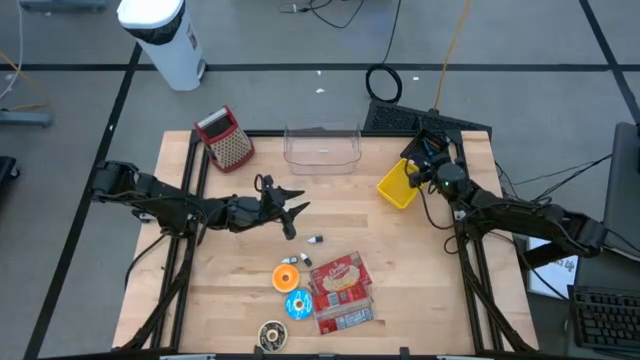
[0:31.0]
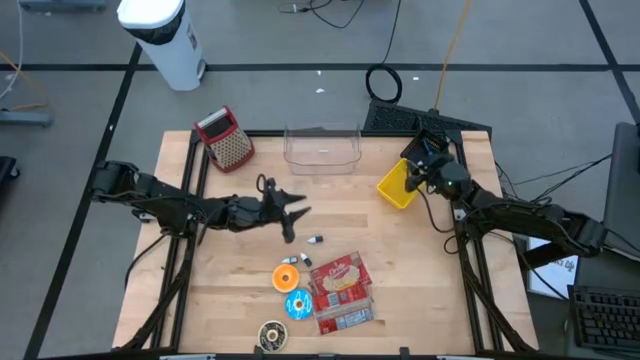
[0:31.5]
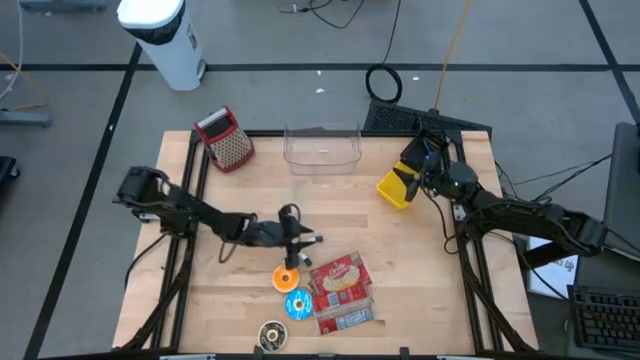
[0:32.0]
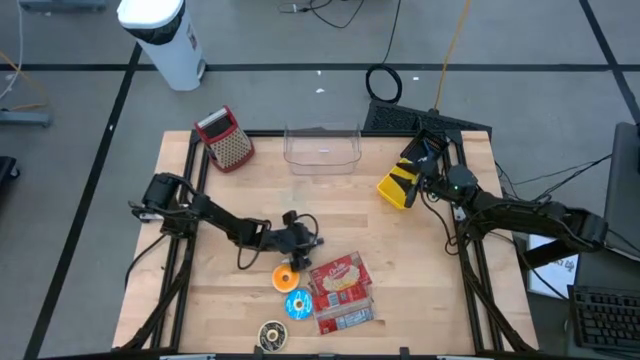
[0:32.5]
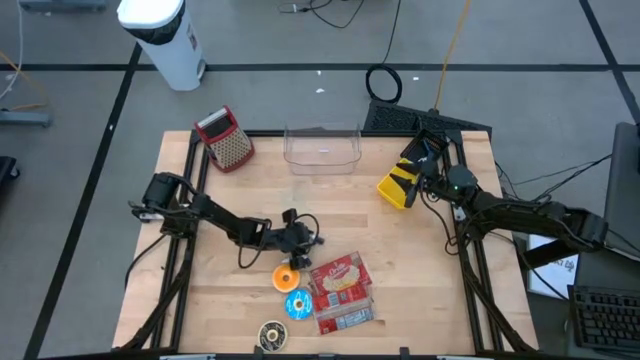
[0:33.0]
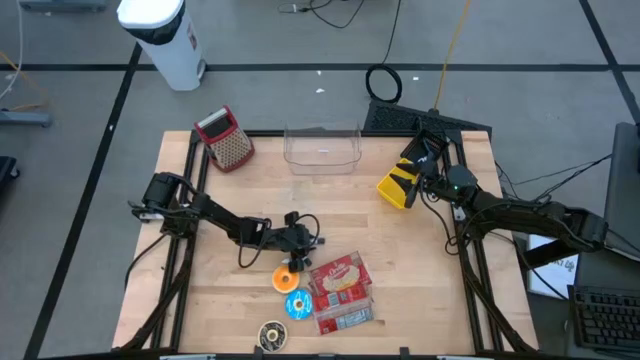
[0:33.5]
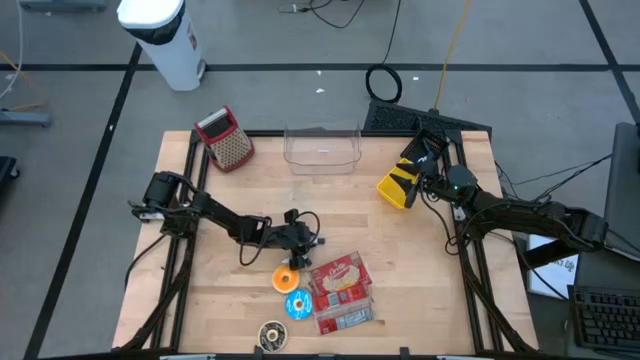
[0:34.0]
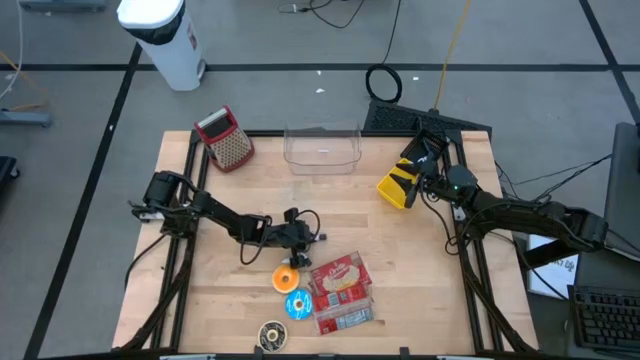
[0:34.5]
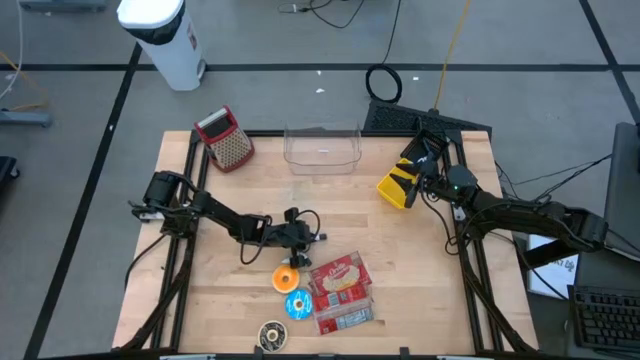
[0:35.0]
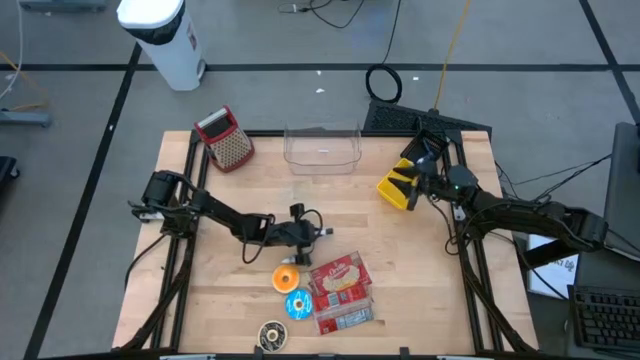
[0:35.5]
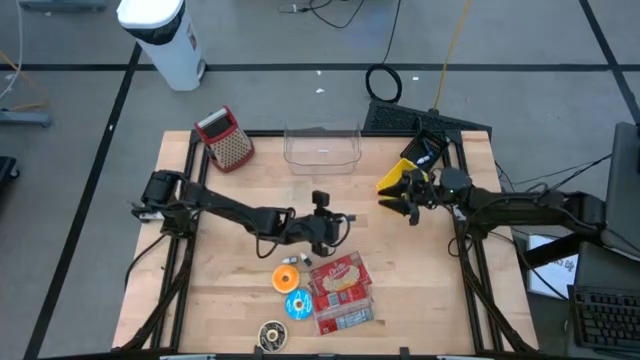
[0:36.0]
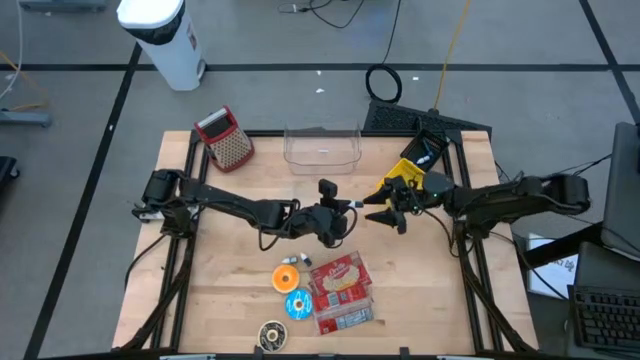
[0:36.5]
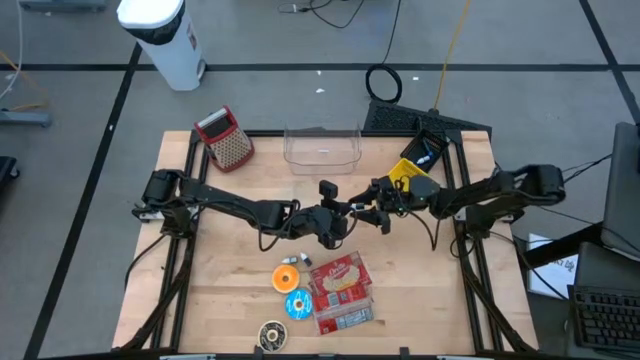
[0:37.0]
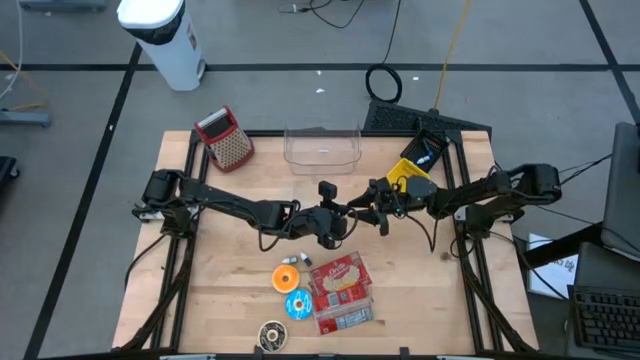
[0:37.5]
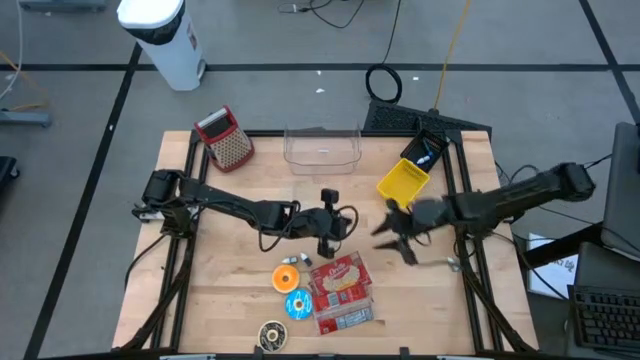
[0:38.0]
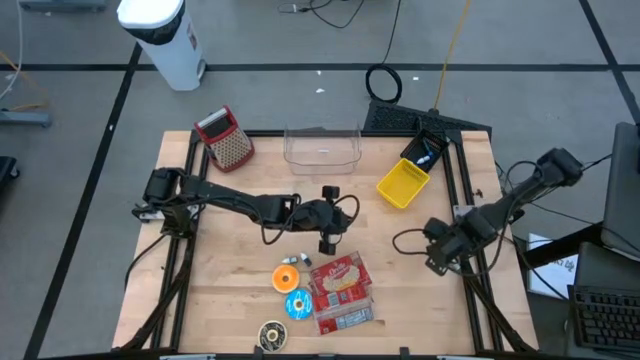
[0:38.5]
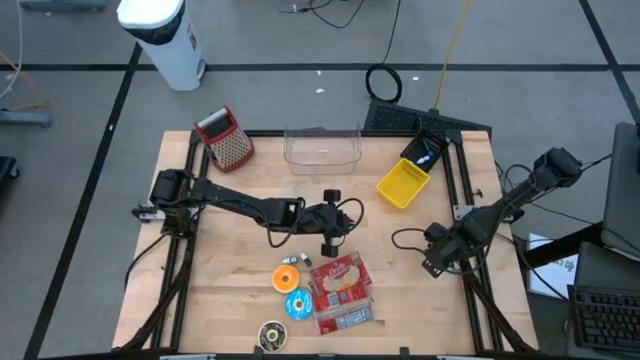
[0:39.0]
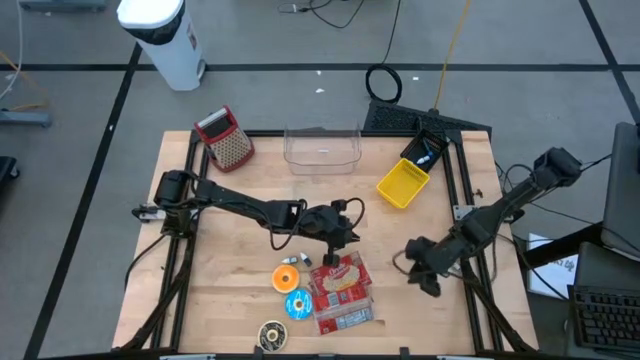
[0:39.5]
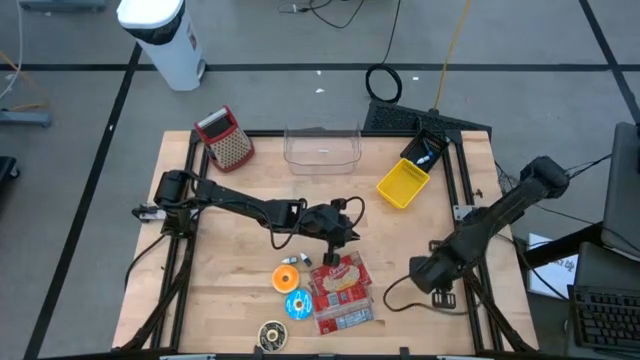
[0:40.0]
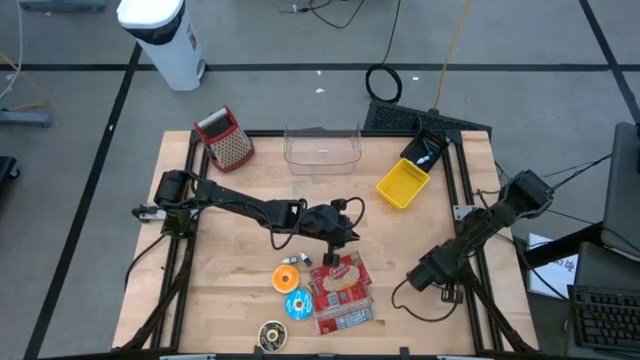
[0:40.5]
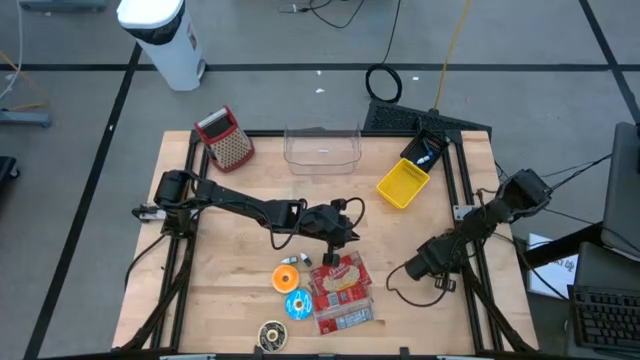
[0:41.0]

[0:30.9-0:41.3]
Put the top green food coloring bottle into the black bin

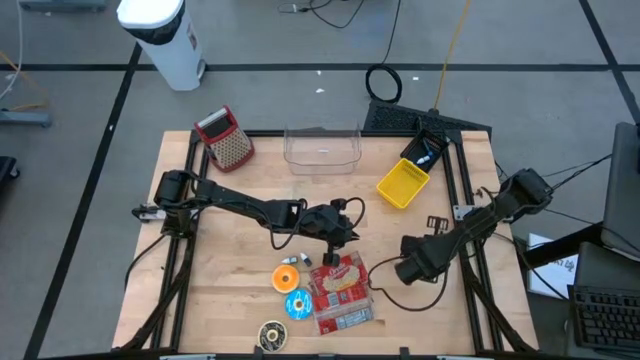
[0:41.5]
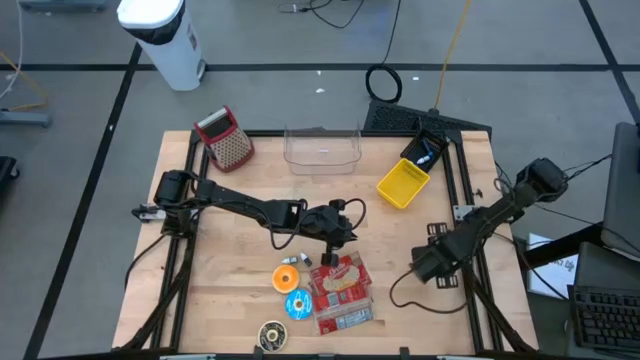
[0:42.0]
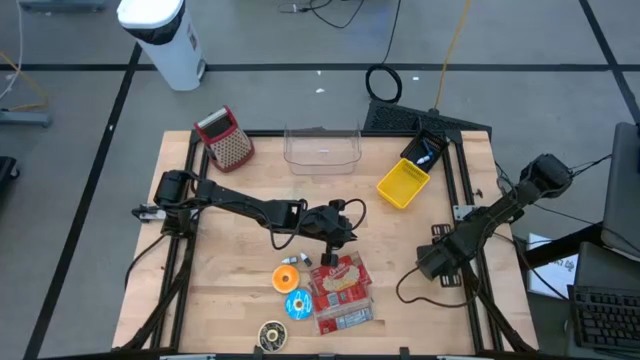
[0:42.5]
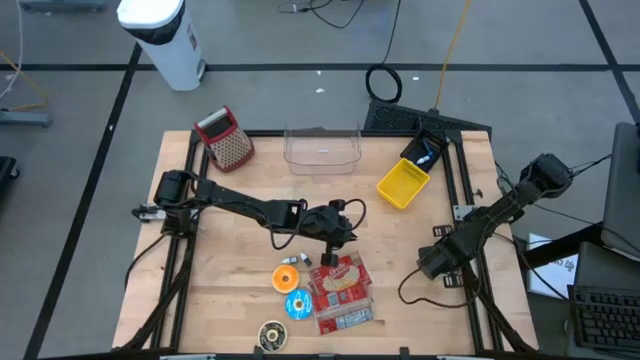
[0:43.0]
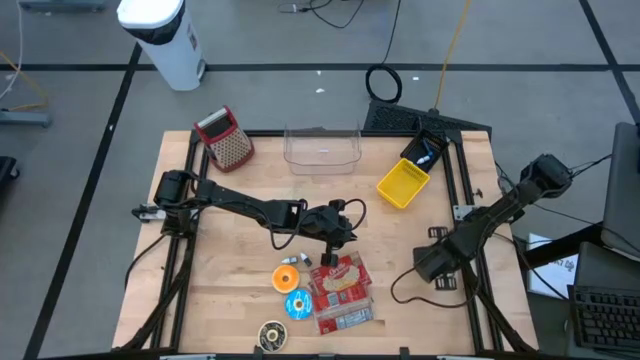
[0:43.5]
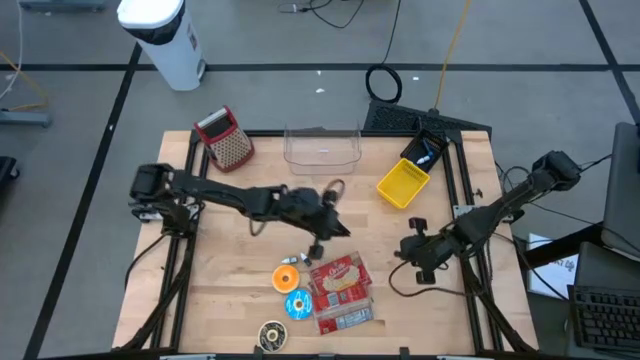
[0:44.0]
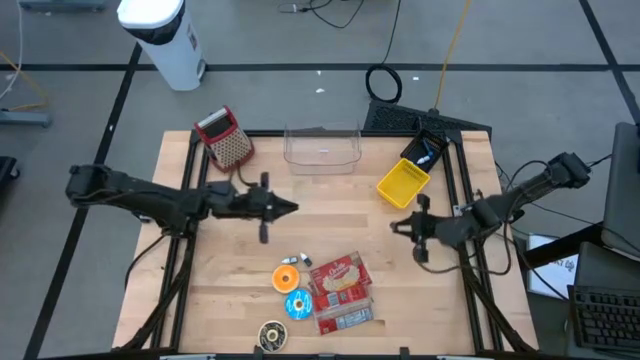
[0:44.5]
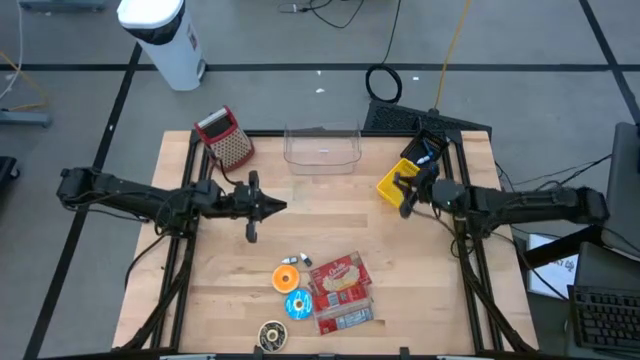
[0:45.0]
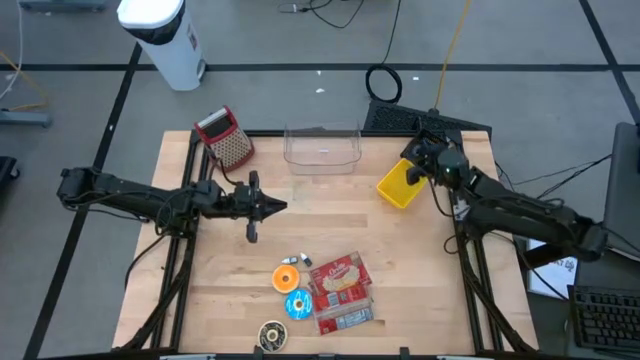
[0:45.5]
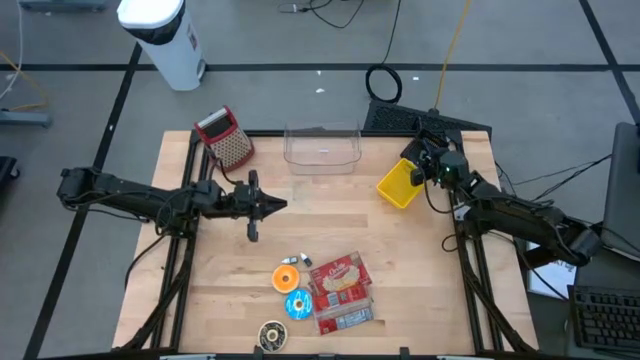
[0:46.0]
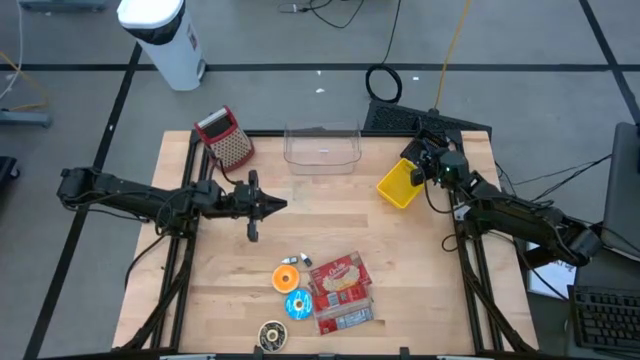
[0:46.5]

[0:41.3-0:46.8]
Put the right green food coloring bottle into the black bin

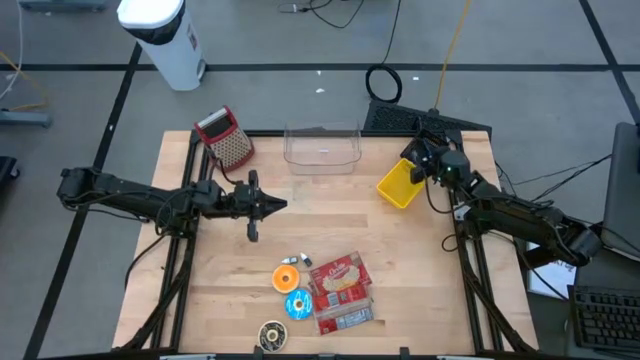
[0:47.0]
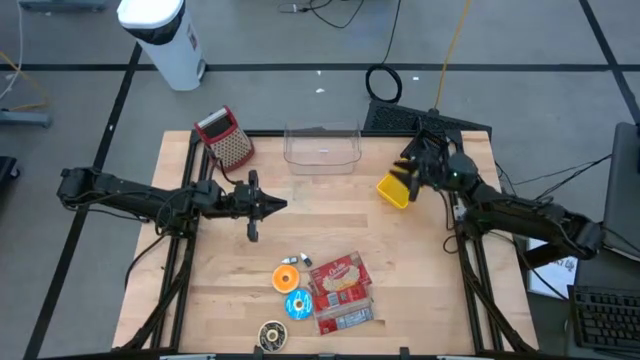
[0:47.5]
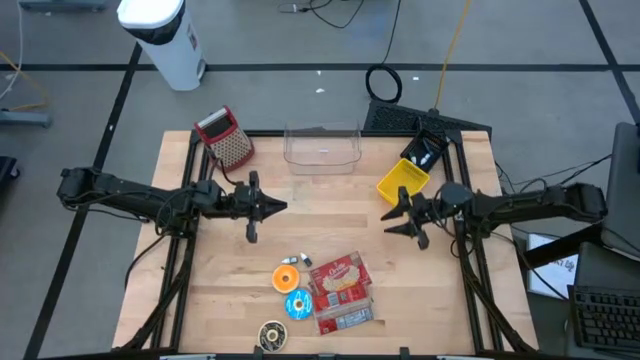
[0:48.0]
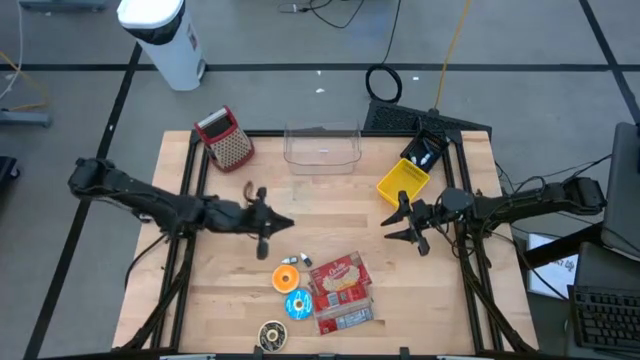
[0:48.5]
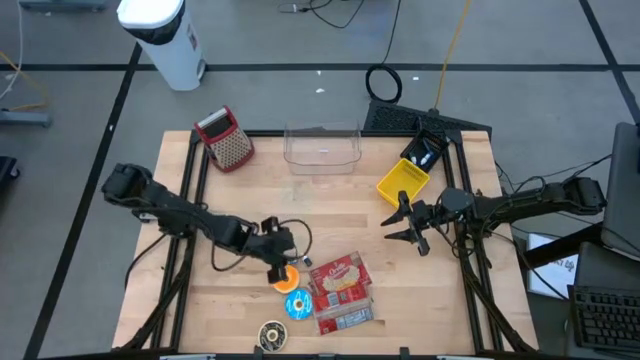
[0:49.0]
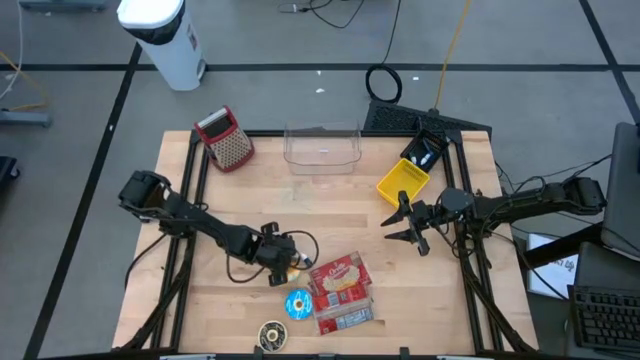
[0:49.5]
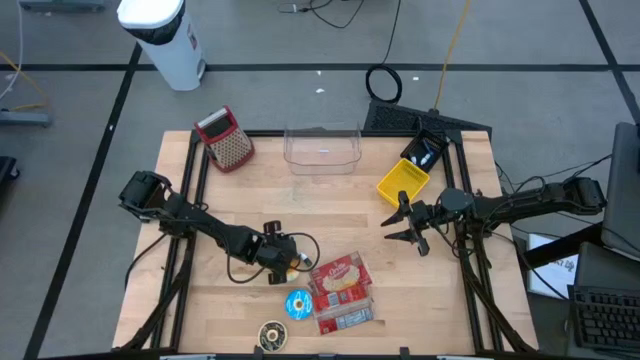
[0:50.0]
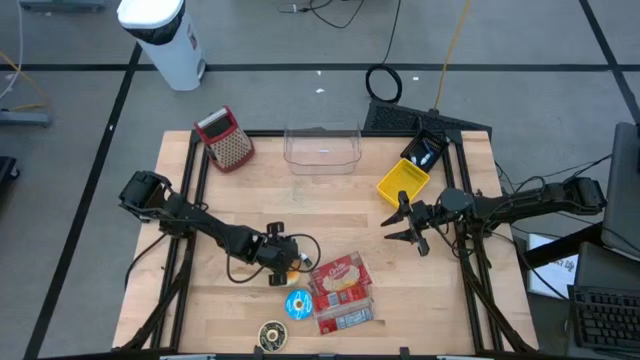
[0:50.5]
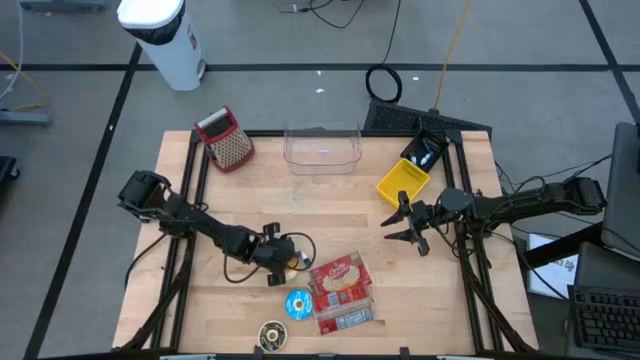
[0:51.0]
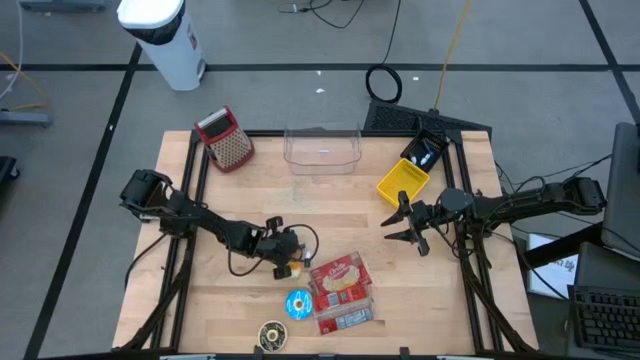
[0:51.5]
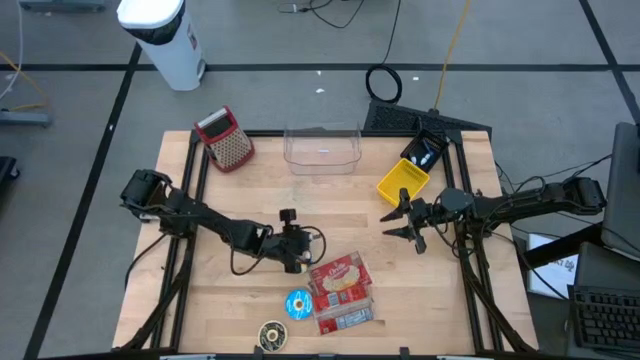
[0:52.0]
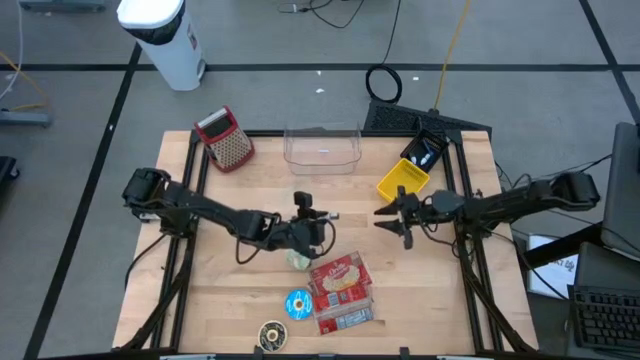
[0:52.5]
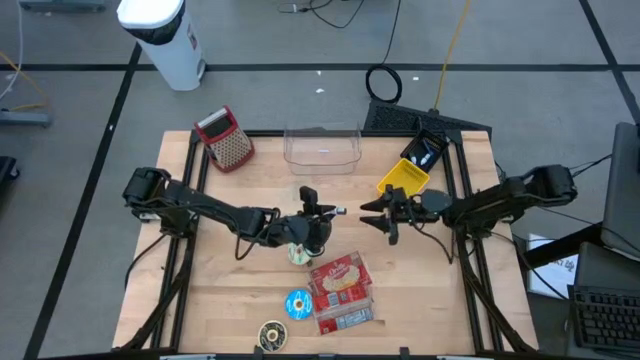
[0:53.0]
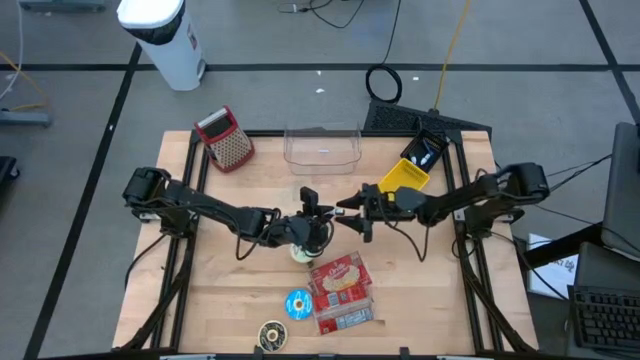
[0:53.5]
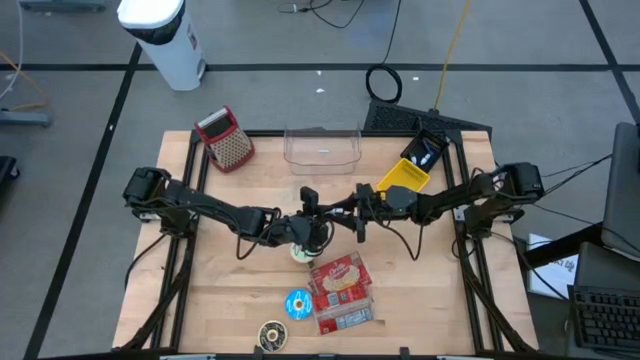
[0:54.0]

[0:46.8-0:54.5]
Put the brown food coloring bottle into the black bin
